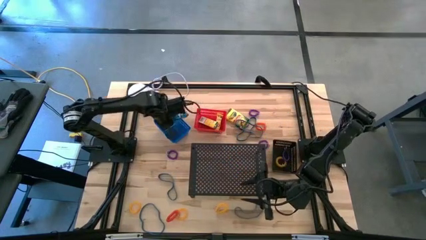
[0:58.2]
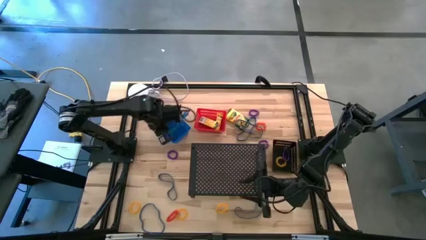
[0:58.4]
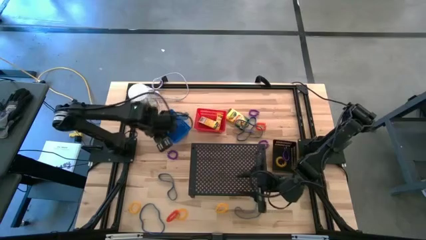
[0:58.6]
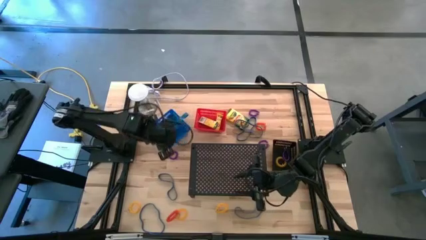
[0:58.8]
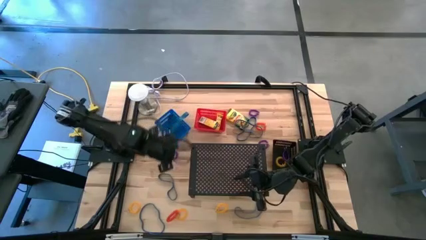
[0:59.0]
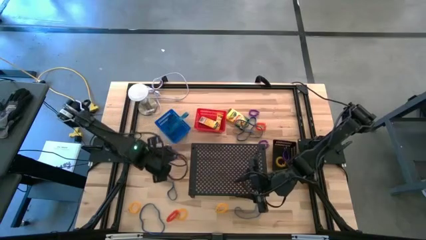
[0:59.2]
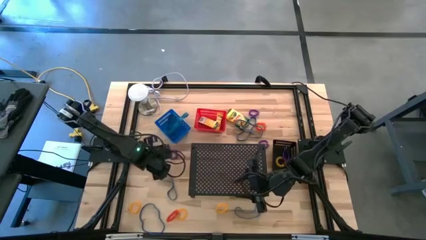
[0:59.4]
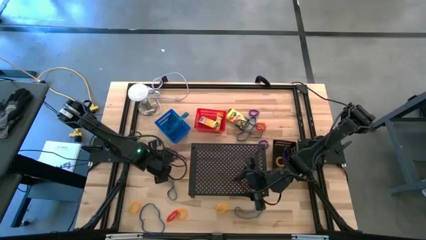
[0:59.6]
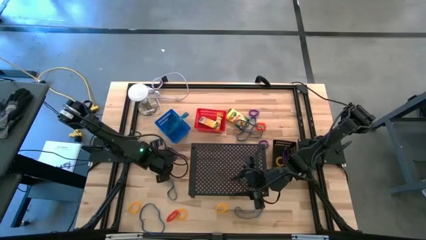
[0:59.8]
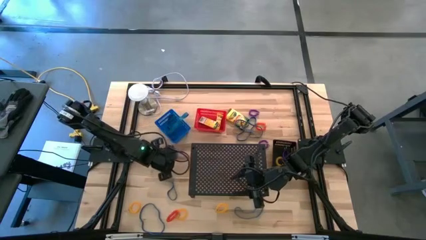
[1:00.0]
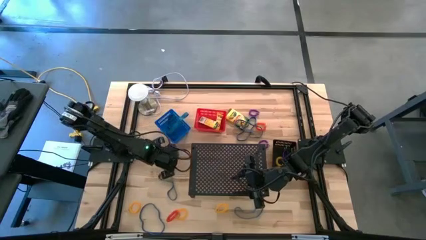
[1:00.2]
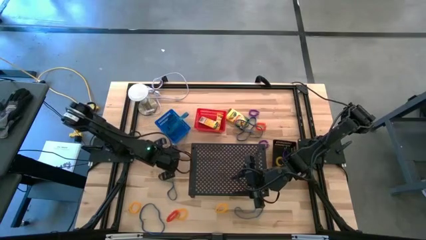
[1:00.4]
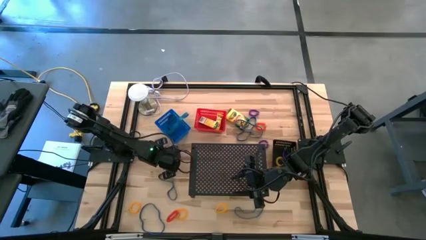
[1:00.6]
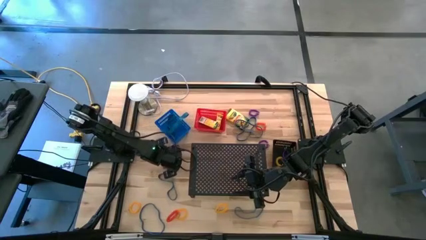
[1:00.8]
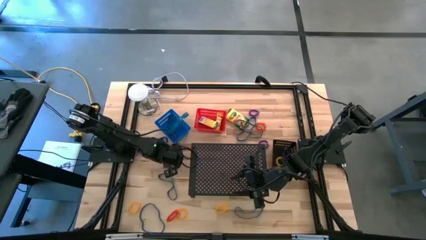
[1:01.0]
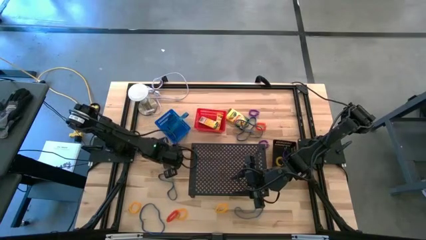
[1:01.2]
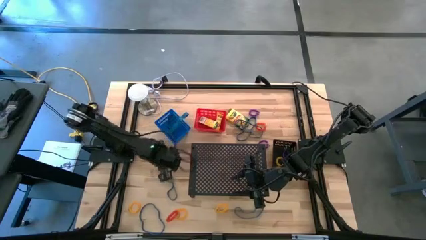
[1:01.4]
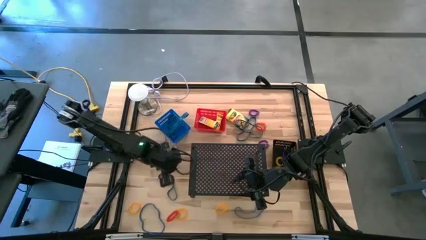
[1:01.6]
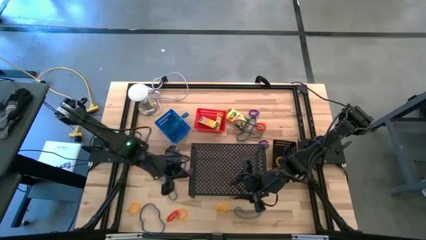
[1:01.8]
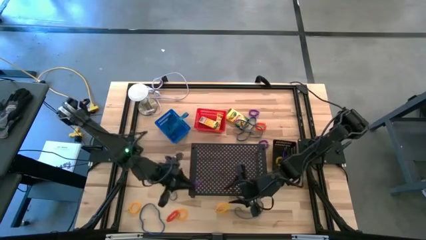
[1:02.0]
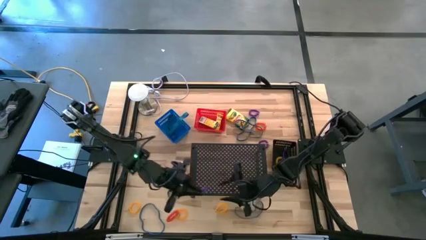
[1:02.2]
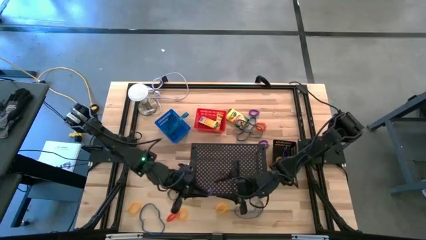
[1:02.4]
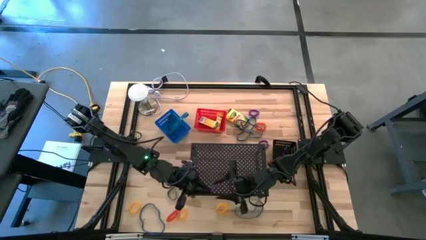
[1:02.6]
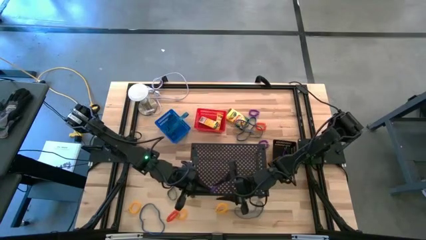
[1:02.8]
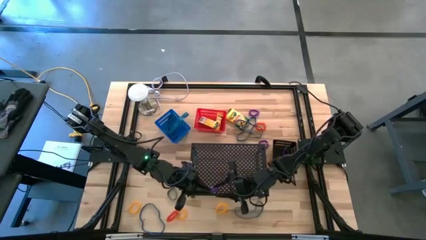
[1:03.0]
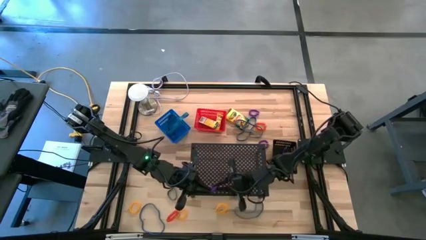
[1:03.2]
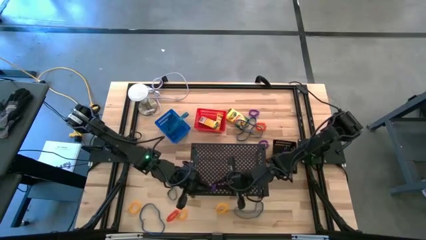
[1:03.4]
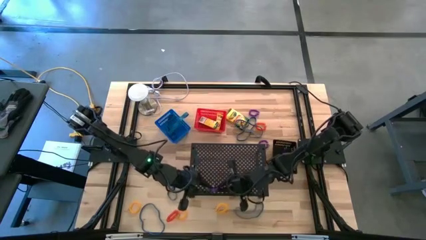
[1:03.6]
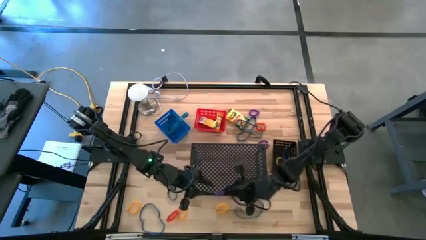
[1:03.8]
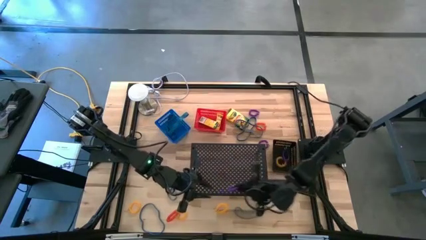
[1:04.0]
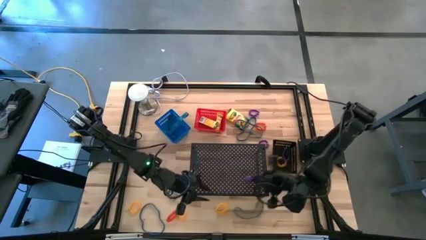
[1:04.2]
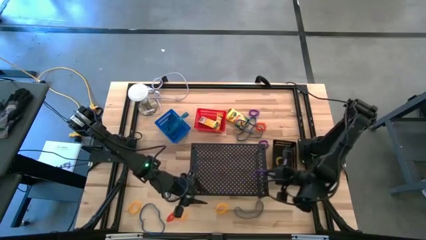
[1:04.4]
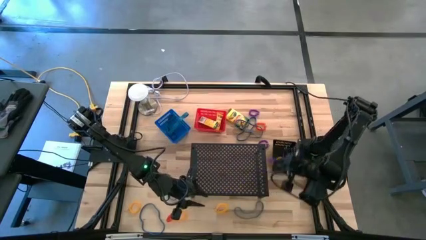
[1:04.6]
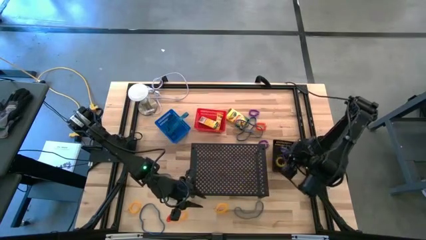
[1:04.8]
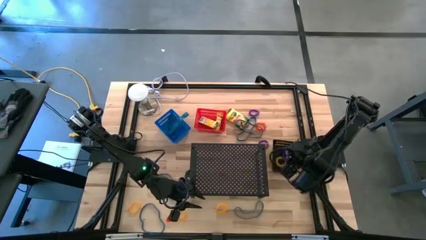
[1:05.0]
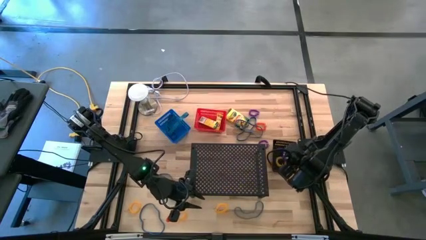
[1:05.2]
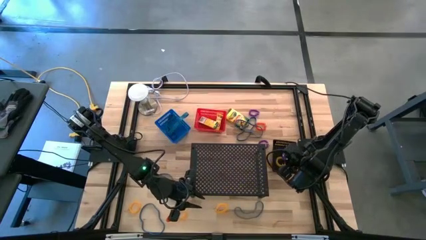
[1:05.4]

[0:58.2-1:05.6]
Task: Pick & Place Office Desk Supplies
Put the purple spring keychain into the black bin

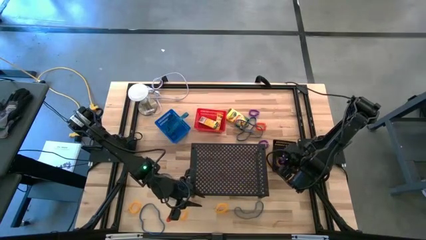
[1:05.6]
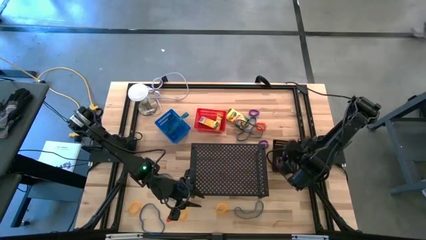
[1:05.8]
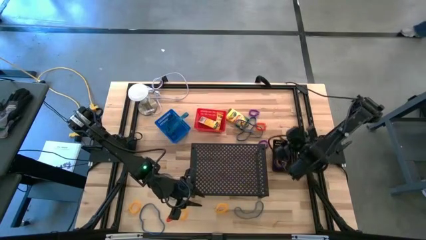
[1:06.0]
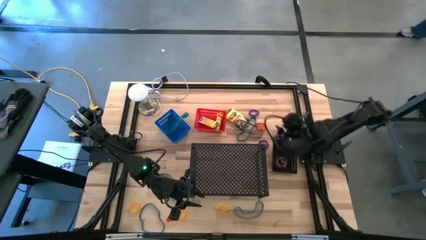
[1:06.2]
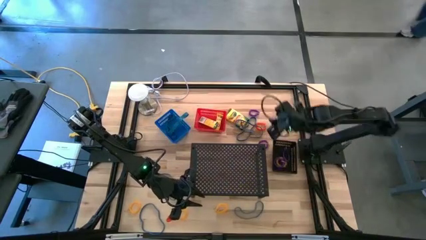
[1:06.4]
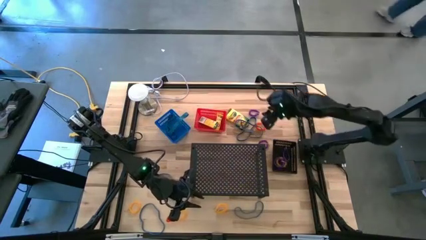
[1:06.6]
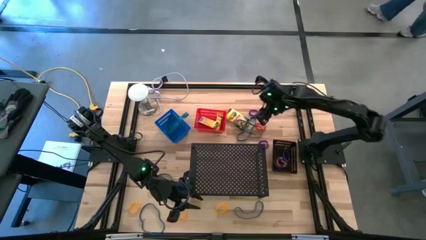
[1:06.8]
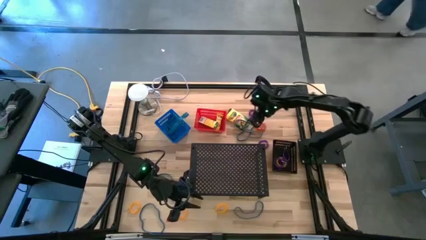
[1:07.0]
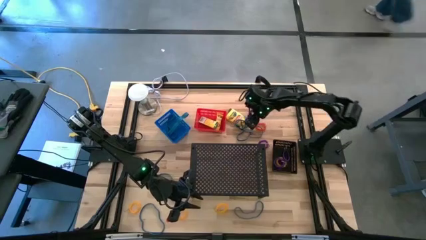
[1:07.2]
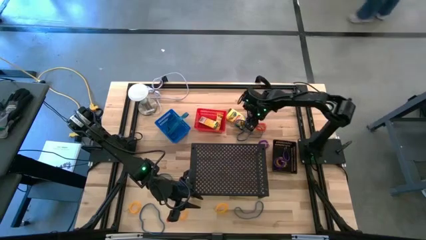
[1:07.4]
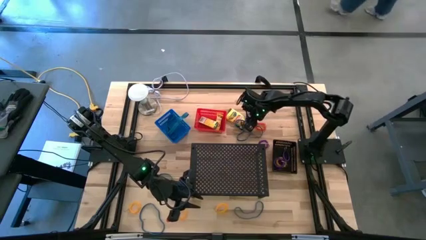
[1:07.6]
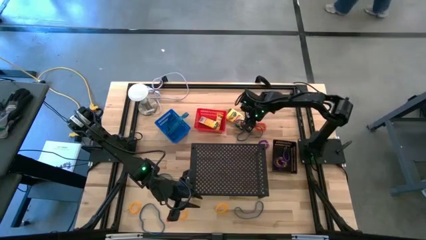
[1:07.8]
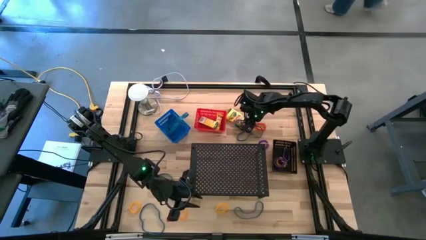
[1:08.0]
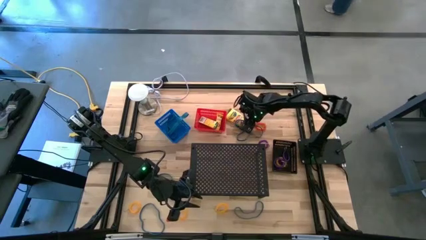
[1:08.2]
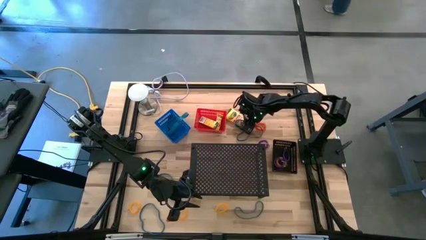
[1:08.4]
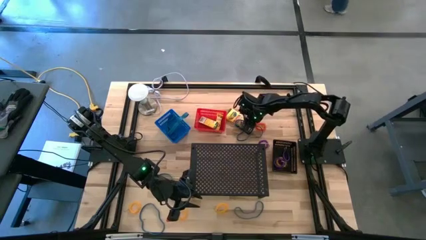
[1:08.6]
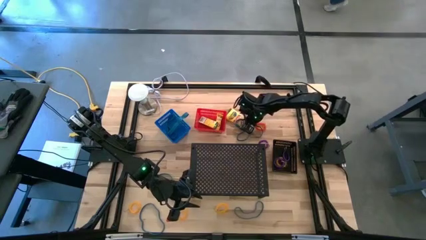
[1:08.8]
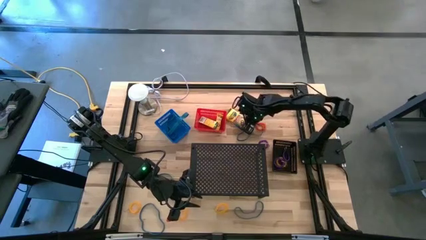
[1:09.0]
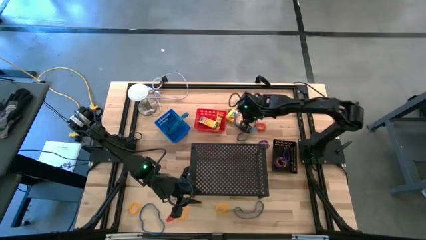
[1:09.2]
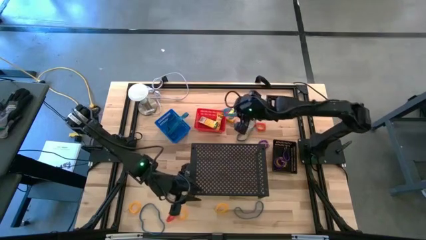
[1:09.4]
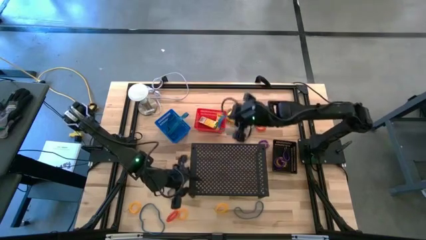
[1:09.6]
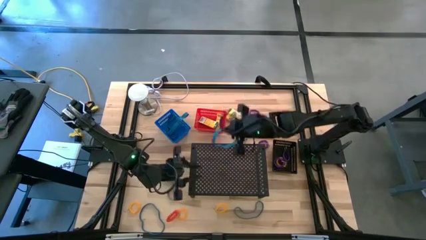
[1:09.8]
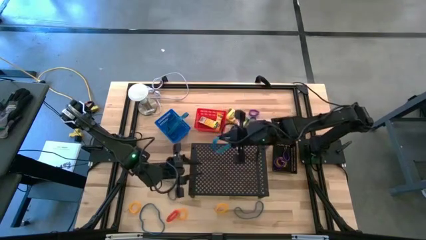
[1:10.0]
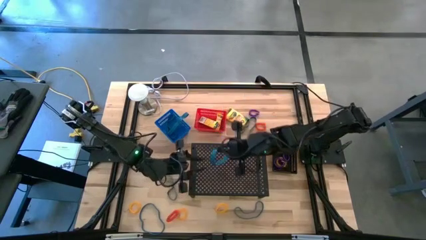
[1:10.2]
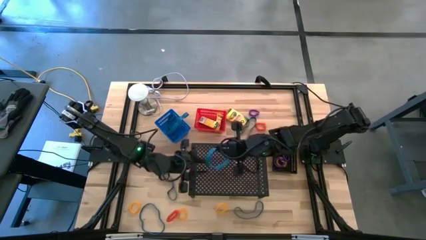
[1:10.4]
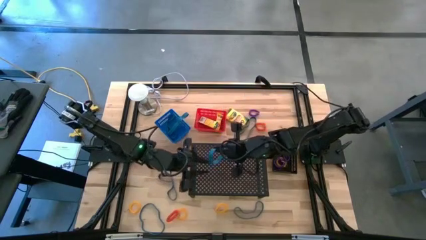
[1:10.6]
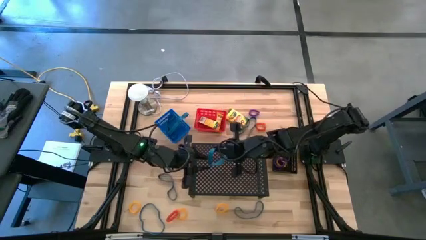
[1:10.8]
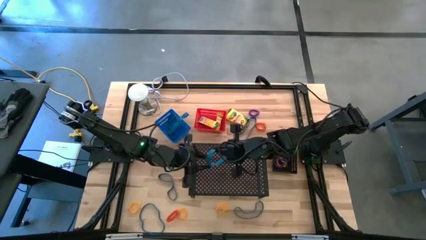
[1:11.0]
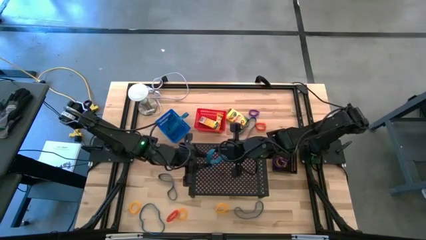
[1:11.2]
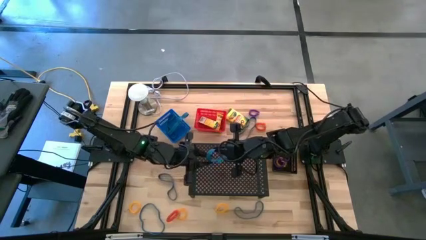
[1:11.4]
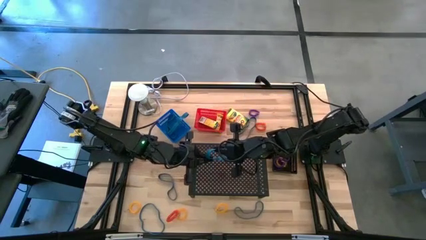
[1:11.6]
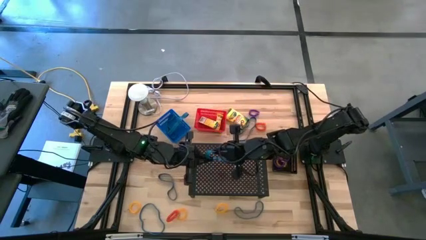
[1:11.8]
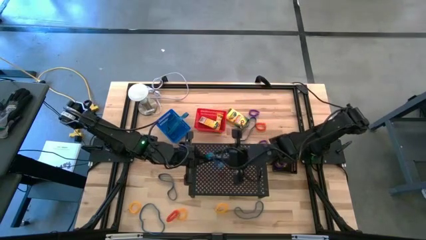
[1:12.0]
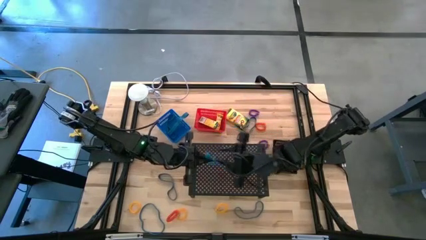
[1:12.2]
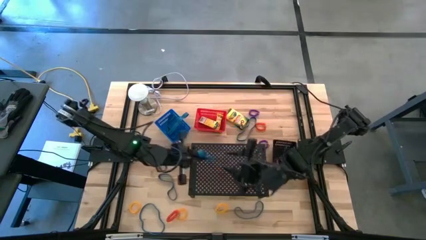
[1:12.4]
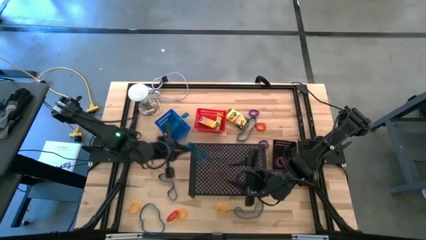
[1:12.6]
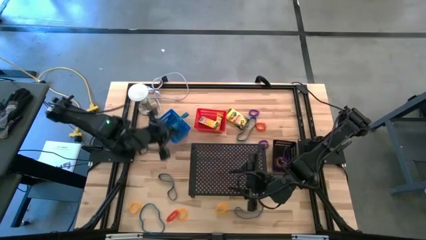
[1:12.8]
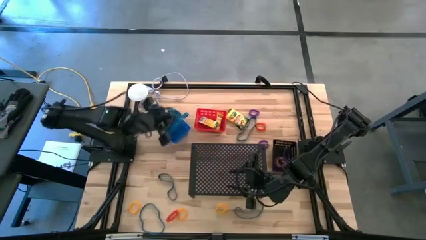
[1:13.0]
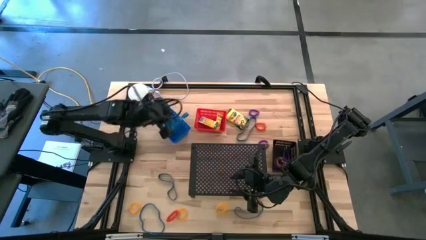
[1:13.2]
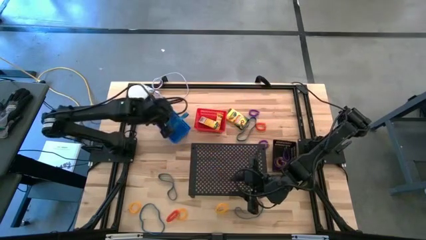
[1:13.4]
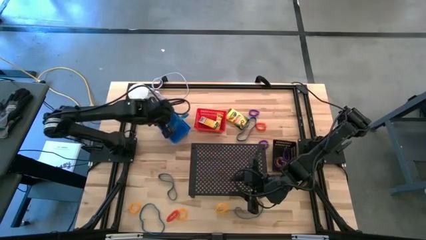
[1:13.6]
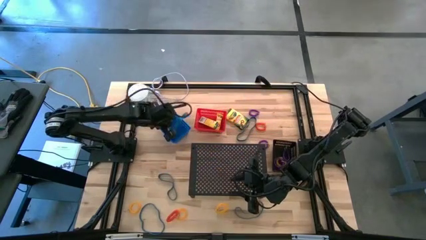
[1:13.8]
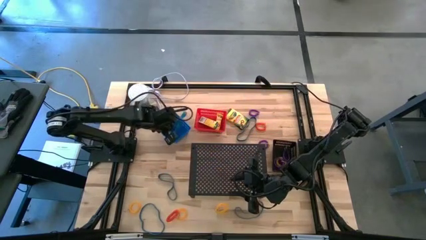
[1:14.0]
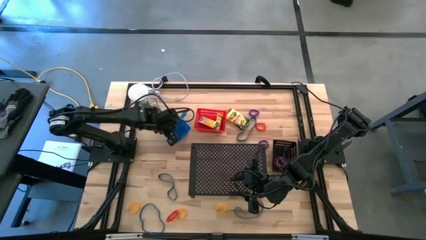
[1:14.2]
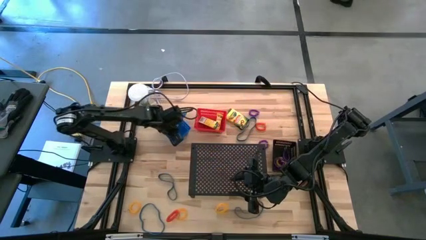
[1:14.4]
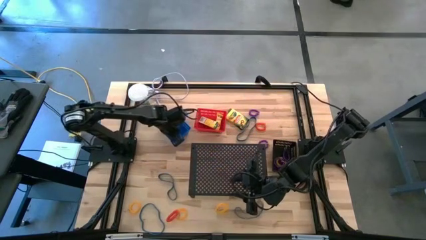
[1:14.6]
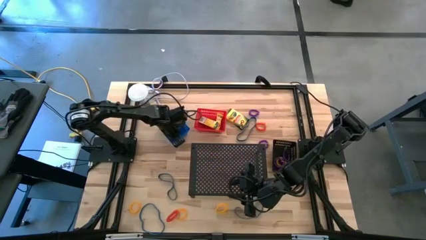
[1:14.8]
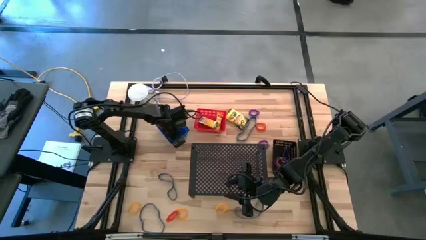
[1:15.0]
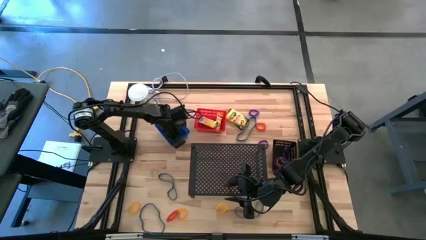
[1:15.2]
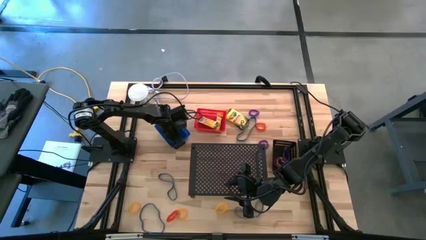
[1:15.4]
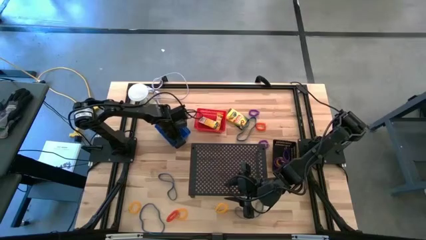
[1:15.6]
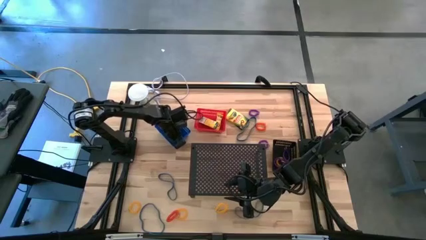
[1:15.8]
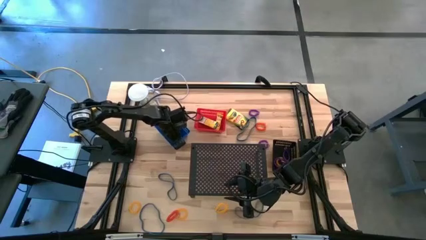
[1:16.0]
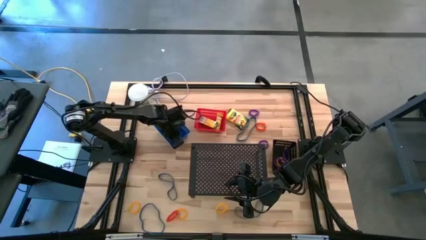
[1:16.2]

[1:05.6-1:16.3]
Put the blue rubber band into the blue bin
